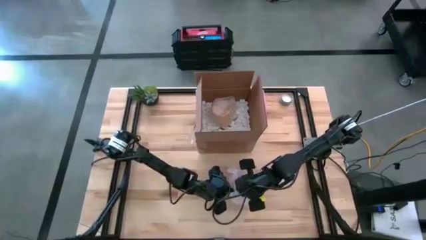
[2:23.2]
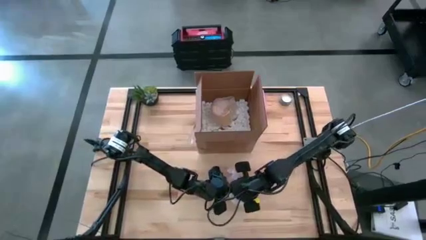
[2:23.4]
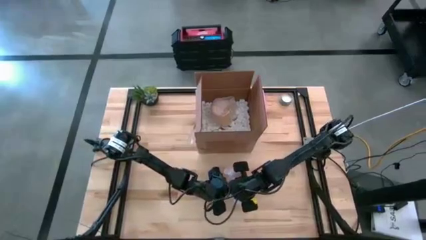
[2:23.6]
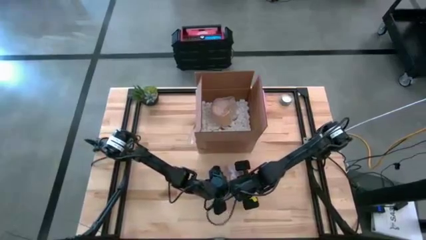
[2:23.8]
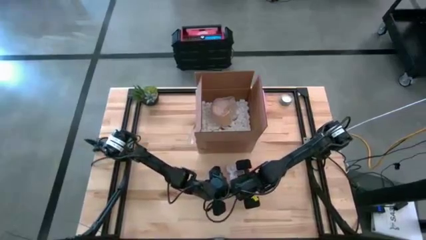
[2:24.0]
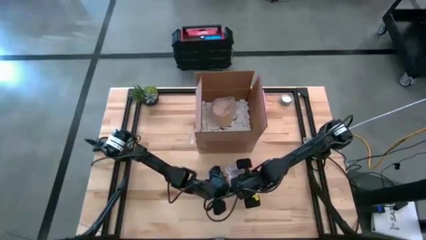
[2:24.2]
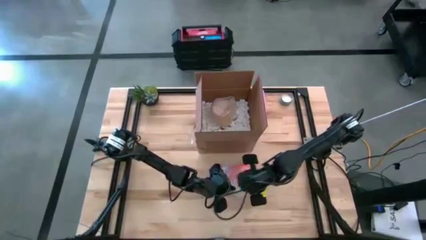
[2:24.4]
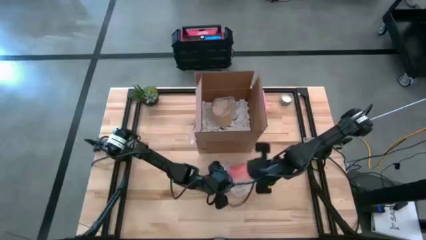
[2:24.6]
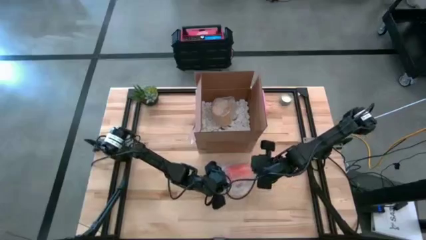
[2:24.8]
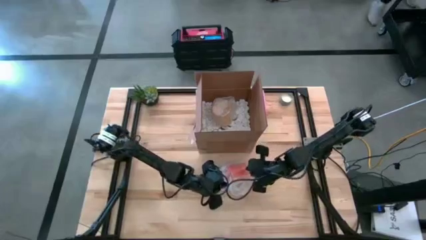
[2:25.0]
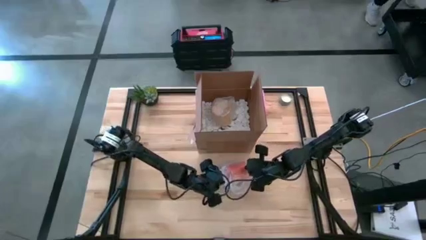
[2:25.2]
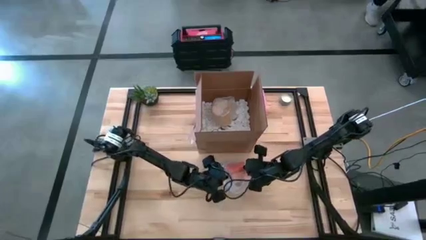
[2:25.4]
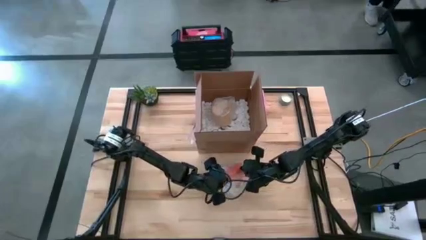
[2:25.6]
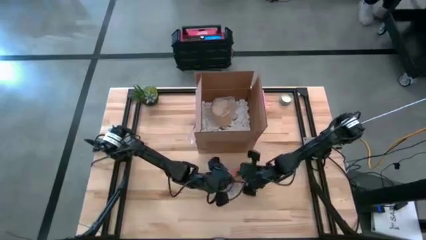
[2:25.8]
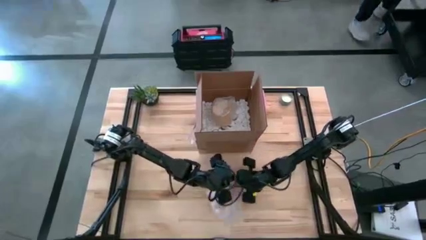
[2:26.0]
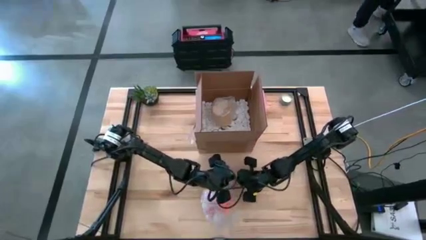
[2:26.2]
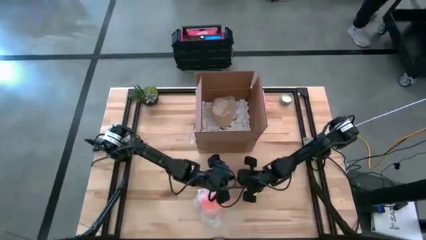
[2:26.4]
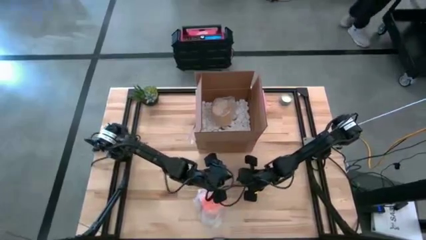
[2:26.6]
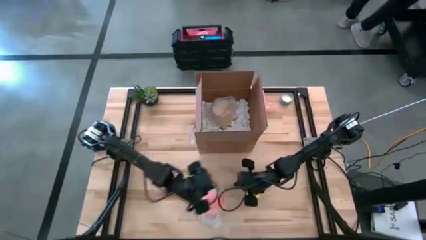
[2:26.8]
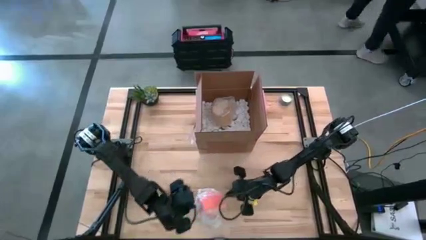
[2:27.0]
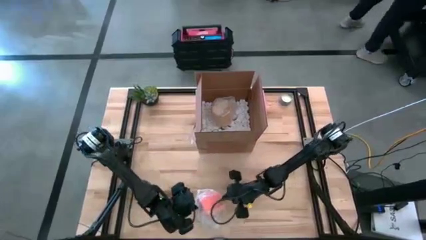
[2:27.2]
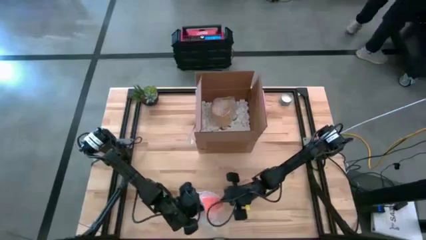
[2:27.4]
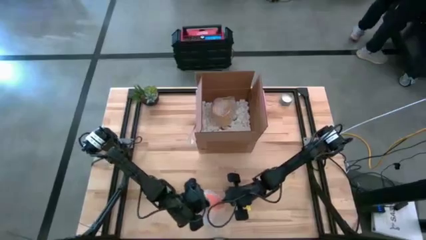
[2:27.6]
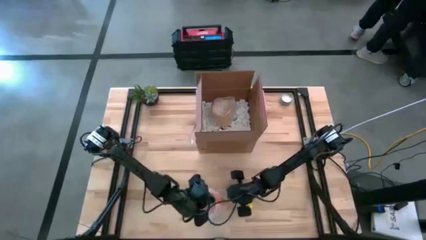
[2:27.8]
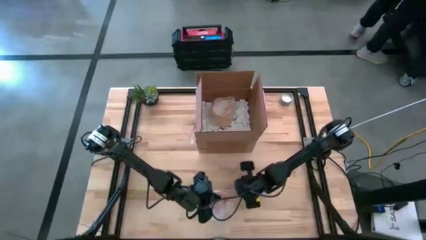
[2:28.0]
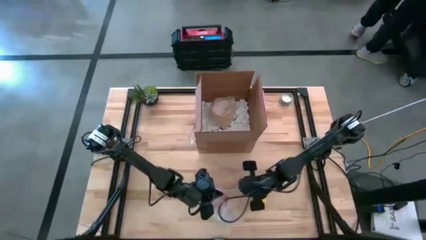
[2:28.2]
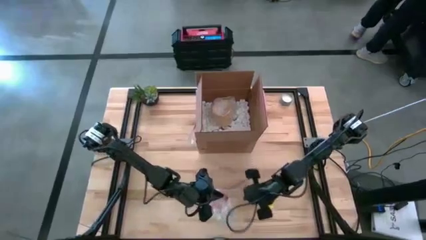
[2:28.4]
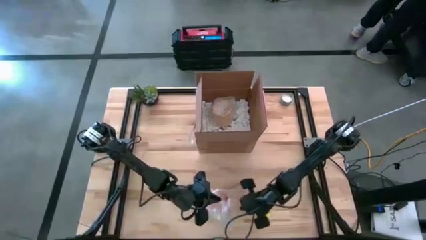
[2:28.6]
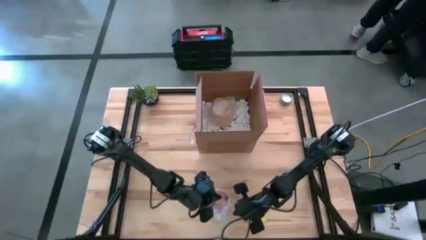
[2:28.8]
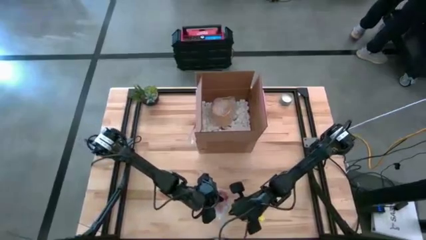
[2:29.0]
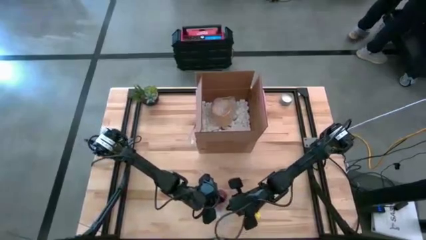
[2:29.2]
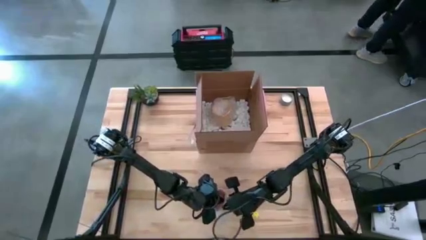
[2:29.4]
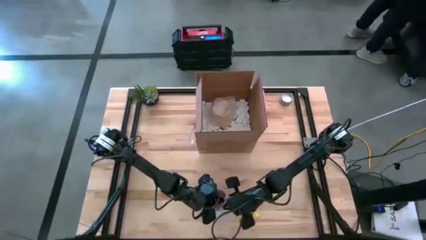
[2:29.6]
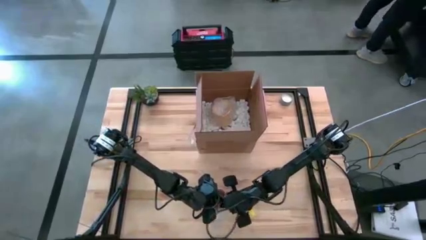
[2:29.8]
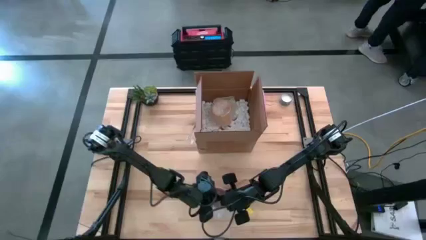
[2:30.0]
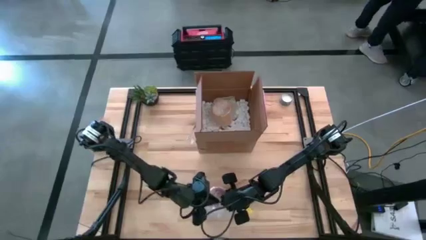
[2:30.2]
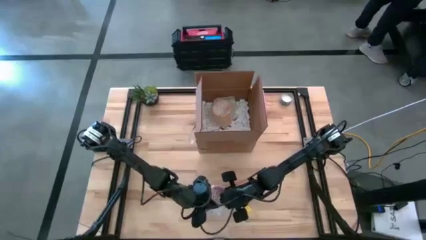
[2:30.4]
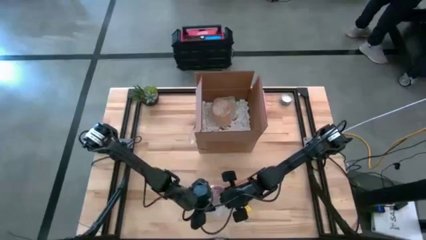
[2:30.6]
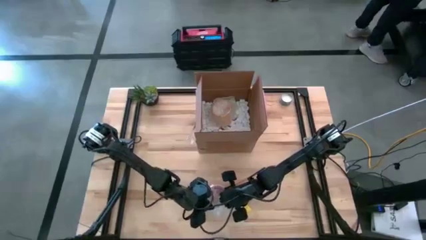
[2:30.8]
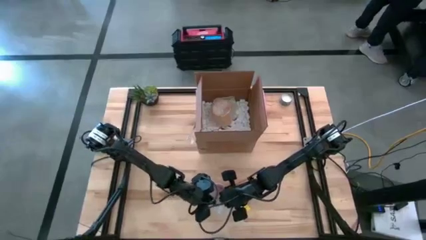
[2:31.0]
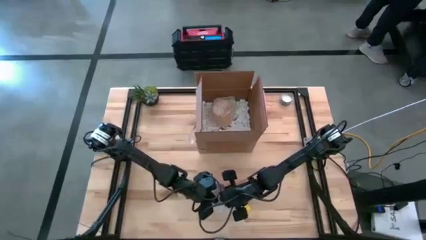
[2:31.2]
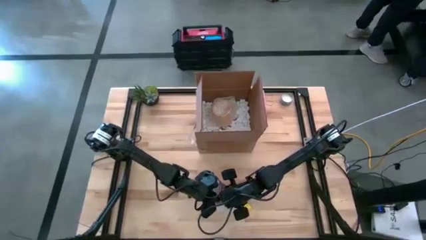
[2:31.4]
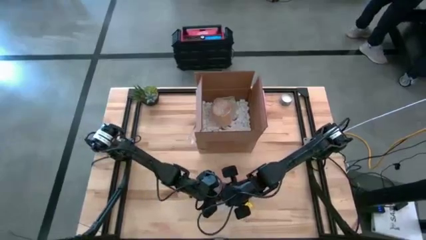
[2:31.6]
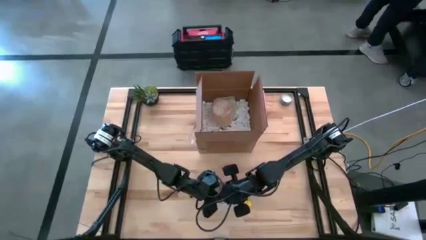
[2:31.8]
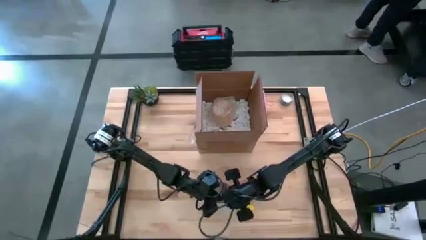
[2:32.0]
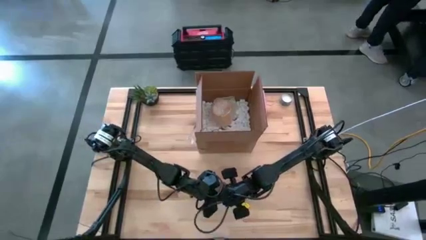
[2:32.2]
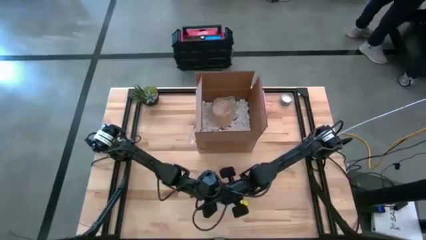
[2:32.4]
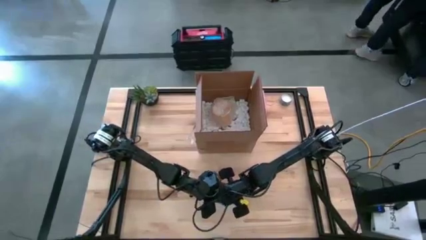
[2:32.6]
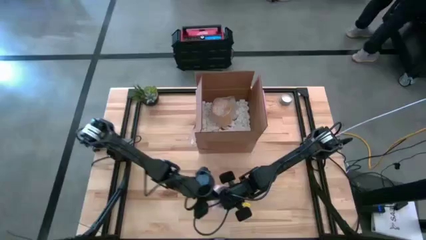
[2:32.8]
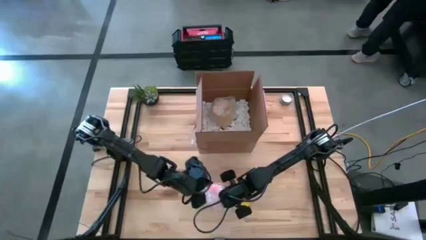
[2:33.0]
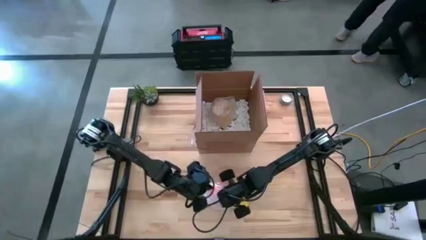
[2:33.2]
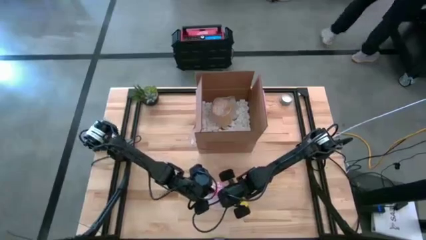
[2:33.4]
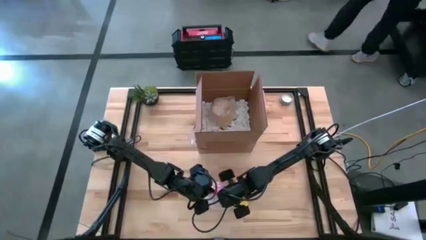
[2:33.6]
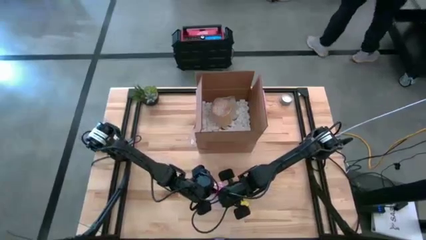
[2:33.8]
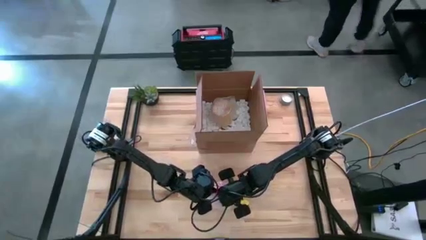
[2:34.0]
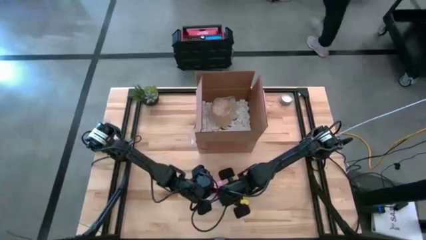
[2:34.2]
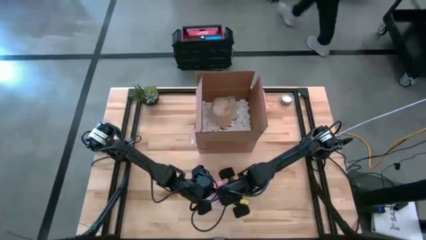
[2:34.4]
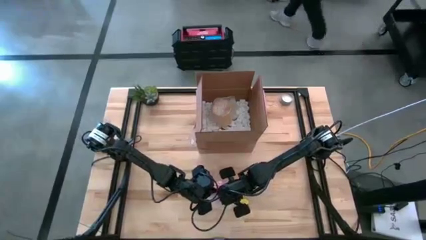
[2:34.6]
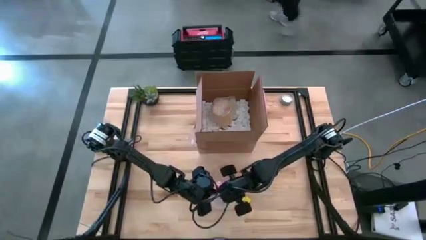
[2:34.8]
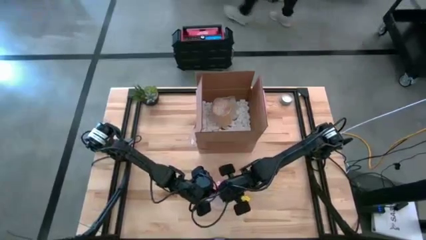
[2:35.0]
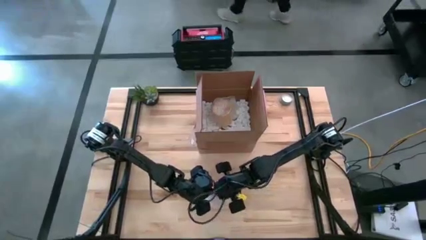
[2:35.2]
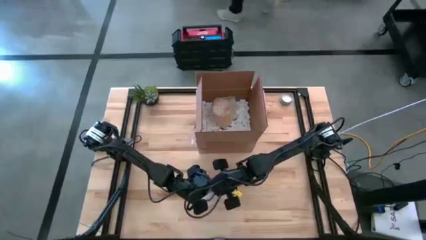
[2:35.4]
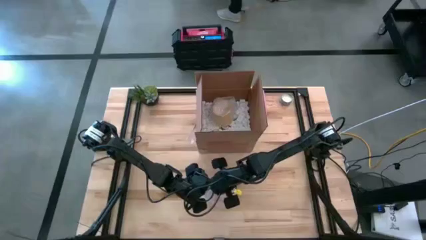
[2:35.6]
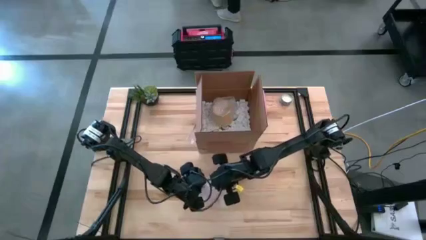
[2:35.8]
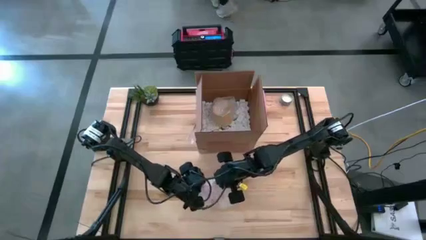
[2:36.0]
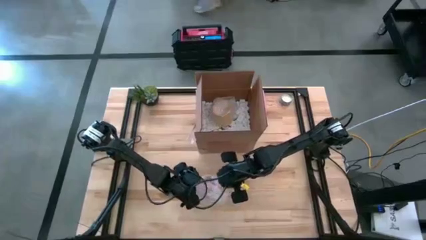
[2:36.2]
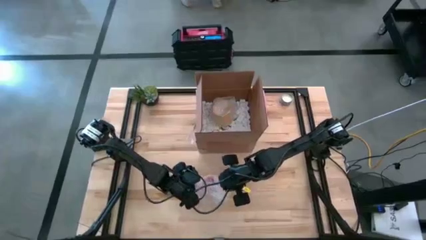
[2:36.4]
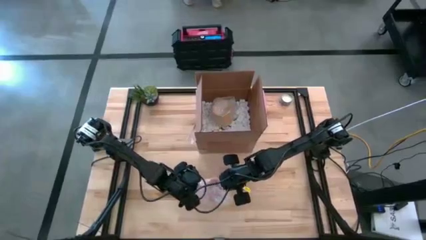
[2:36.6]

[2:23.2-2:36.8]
Task: wrap mug
Wrap the orange mug with bubble wrap

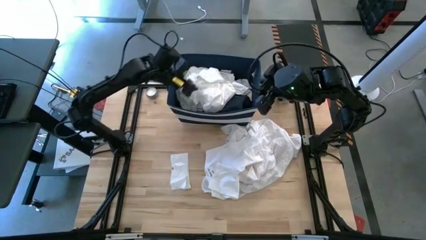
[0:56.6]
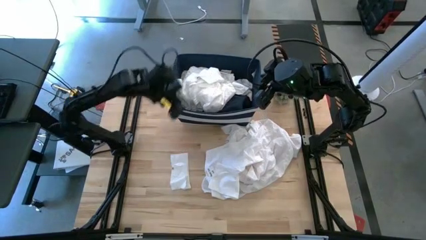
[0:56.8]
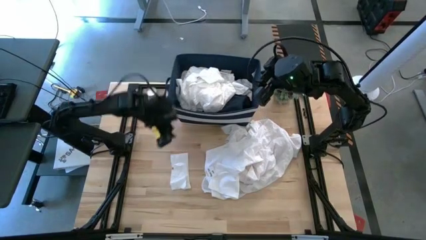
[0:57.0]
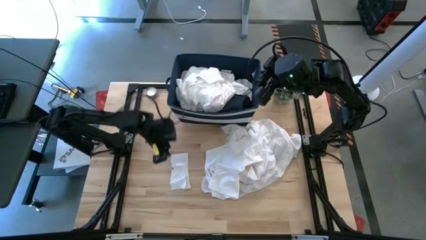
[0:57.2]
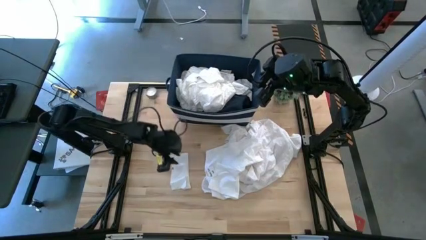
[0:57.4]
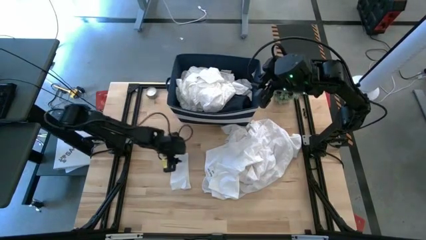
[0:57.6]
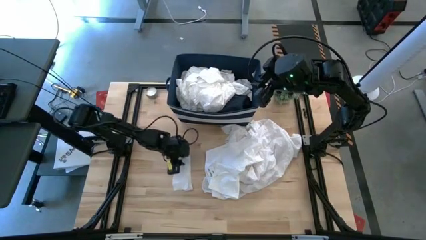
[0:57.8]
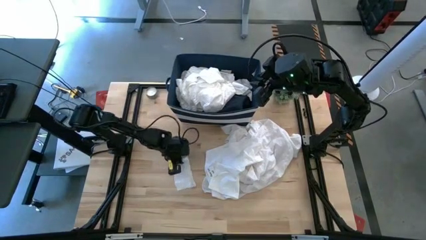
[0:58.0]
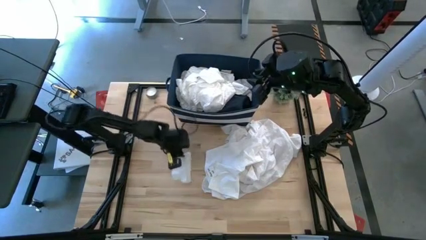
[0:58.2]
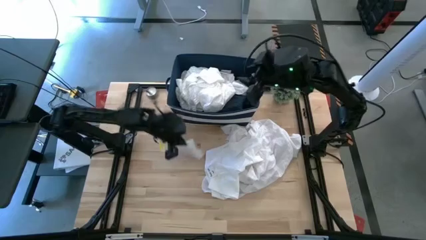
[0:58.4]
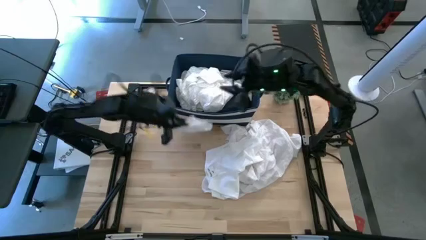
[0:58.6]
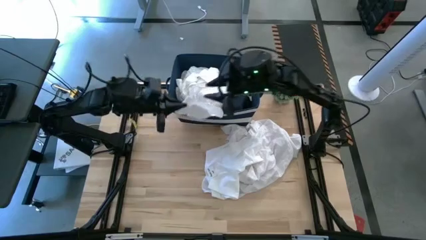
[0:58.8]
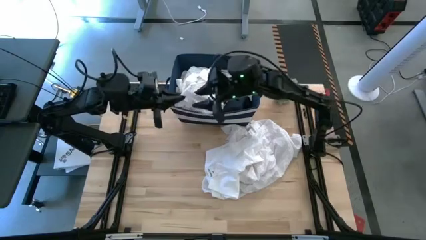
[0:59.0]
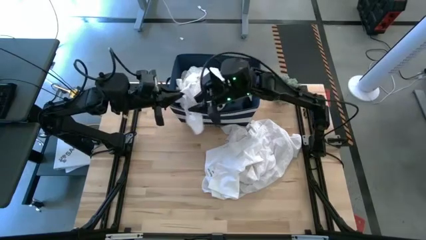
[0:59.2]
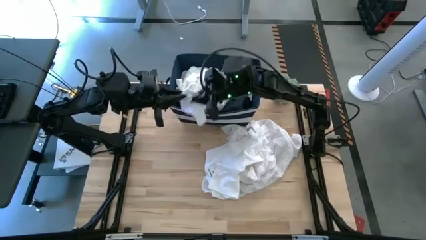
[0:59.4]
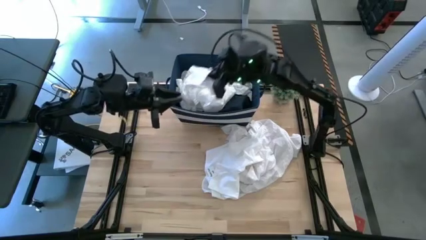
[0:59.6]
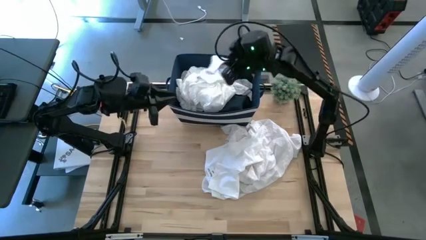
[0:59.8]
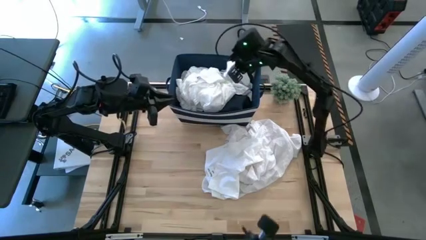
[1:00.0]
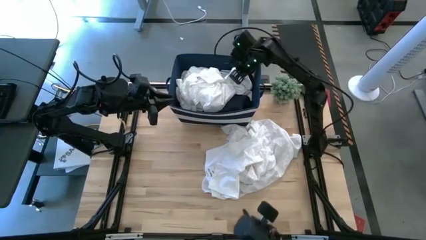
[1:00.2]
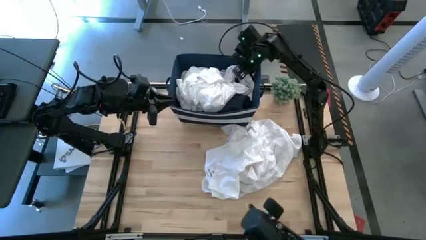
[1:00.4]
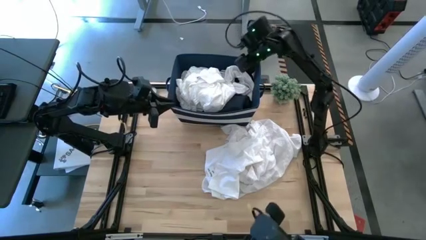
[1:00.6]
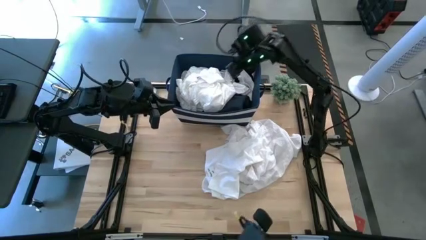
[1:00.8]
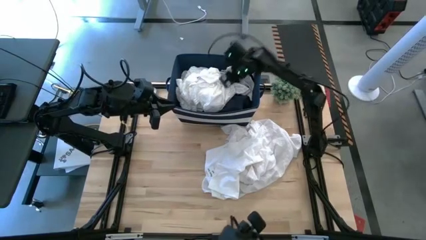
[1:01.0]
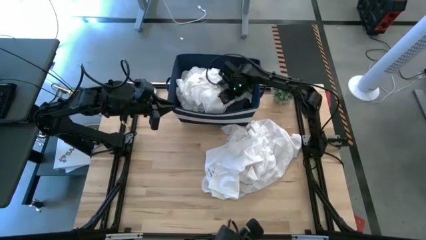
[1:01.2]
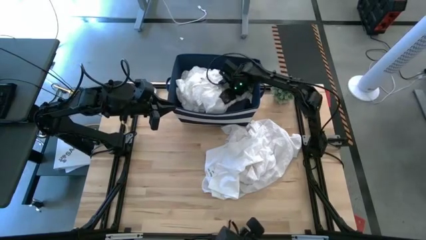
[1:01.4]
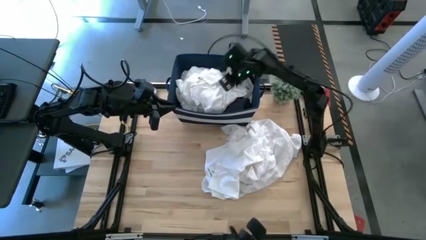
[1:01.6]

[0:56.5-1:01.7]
Task: Sort clothes
Put the white sock into the blue bin
